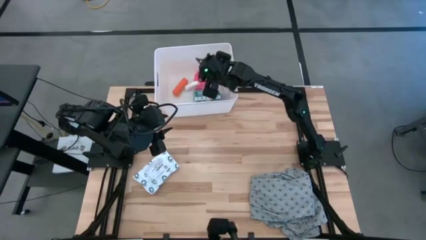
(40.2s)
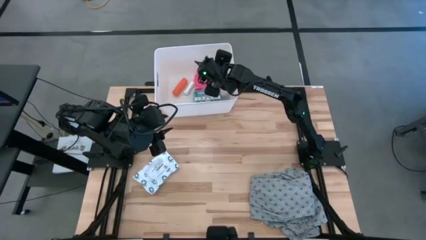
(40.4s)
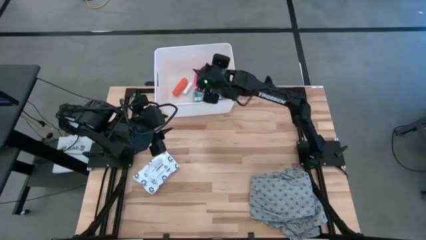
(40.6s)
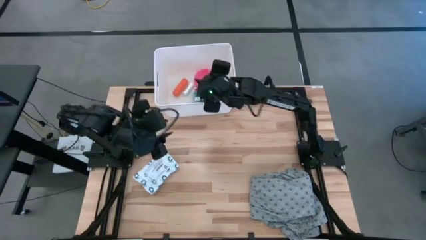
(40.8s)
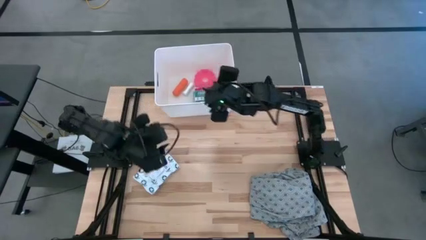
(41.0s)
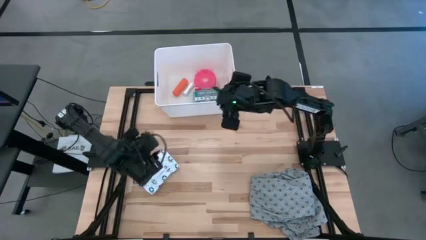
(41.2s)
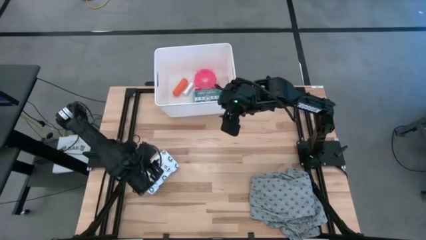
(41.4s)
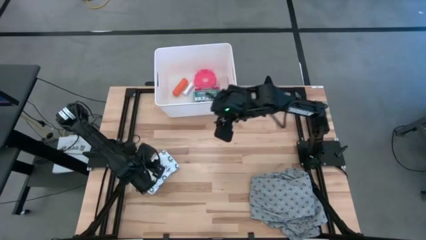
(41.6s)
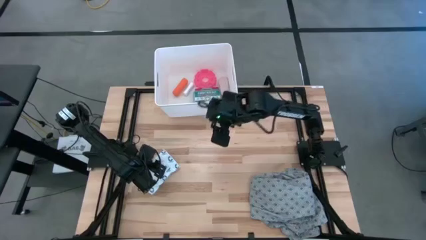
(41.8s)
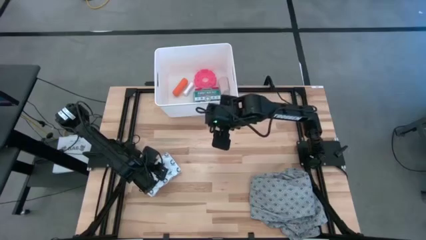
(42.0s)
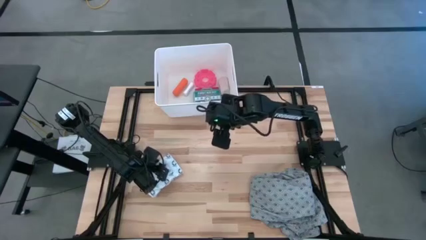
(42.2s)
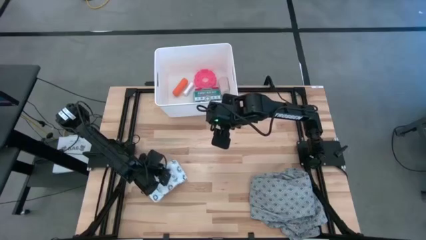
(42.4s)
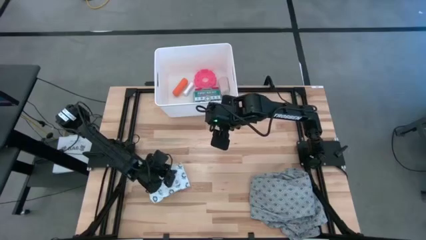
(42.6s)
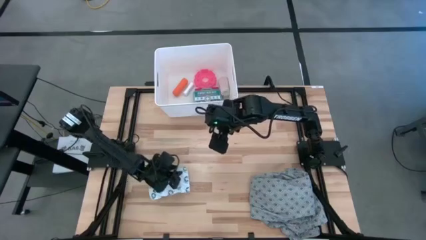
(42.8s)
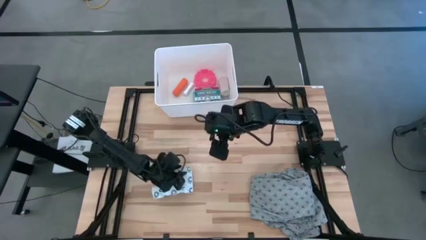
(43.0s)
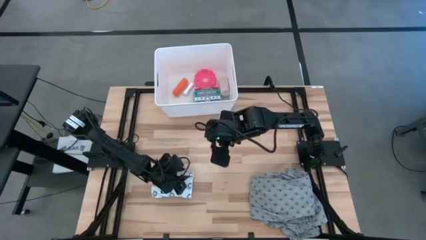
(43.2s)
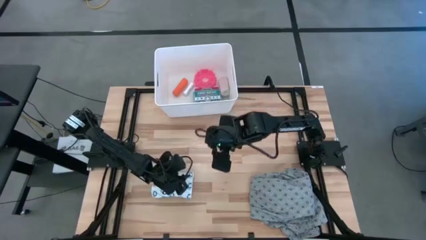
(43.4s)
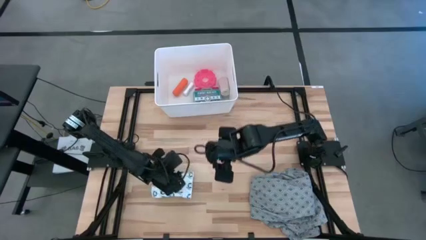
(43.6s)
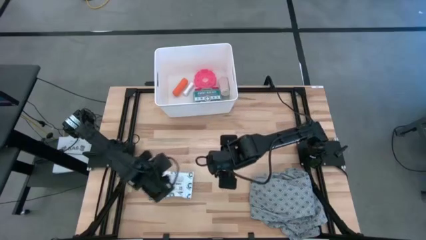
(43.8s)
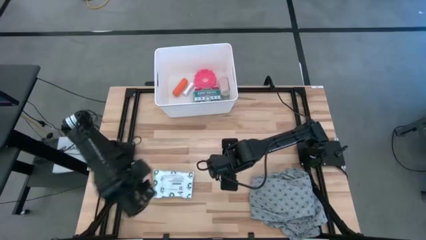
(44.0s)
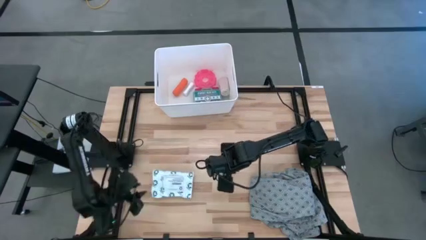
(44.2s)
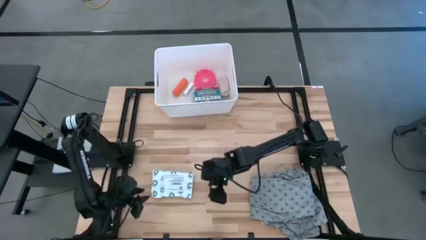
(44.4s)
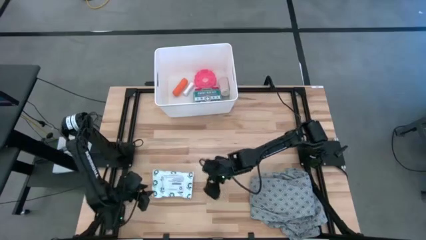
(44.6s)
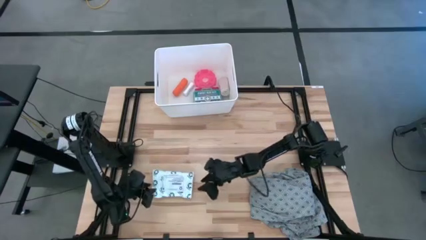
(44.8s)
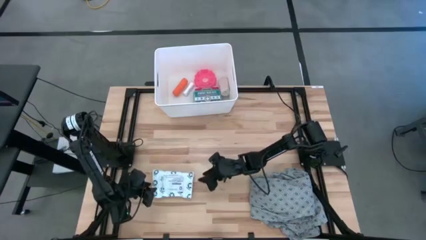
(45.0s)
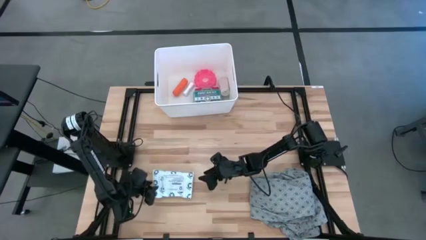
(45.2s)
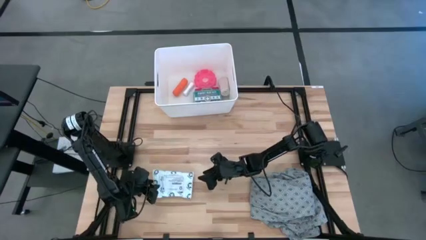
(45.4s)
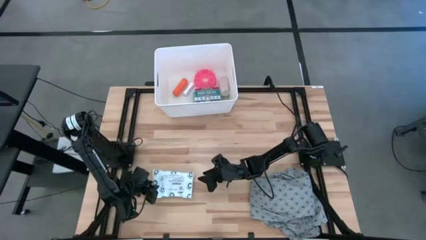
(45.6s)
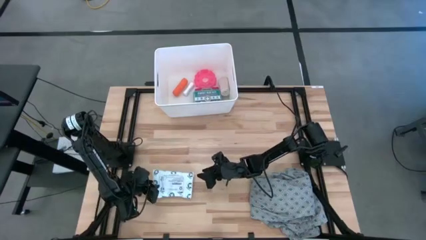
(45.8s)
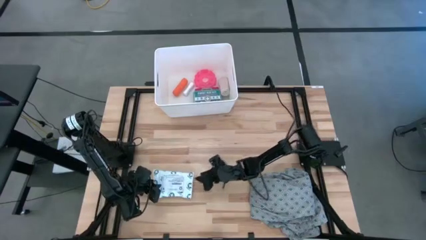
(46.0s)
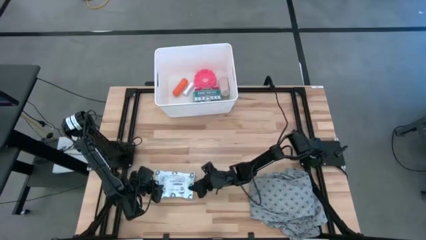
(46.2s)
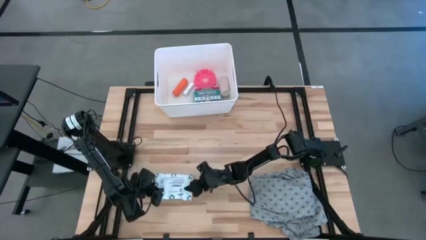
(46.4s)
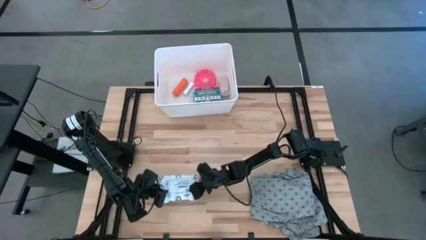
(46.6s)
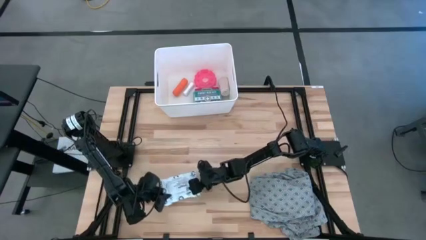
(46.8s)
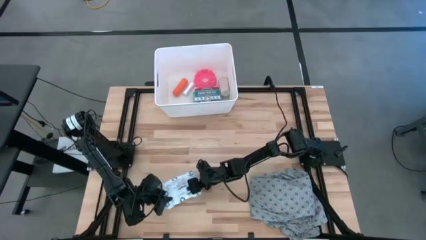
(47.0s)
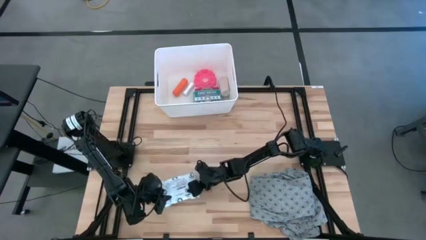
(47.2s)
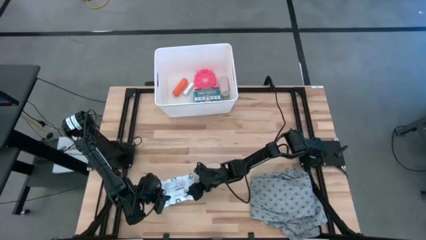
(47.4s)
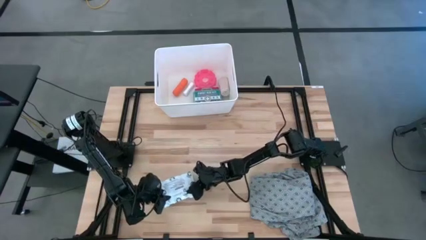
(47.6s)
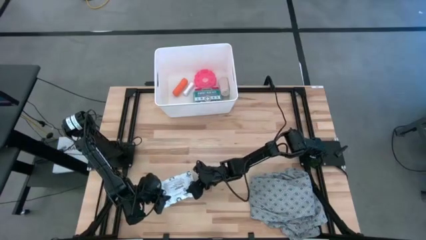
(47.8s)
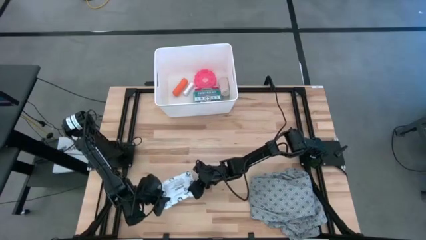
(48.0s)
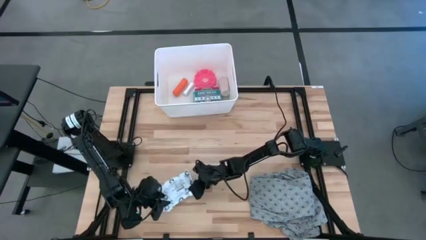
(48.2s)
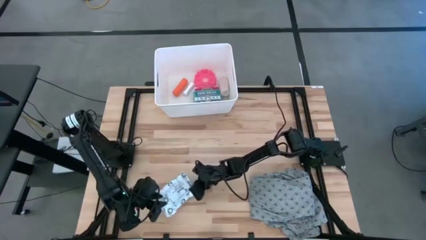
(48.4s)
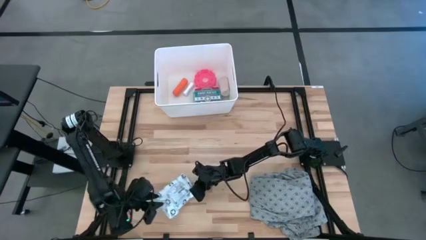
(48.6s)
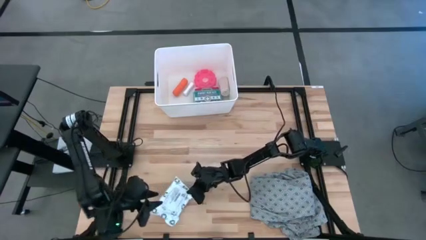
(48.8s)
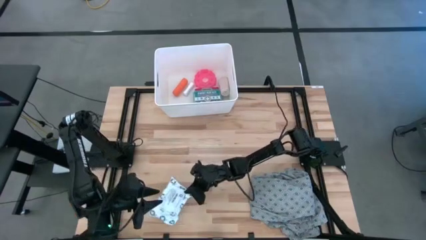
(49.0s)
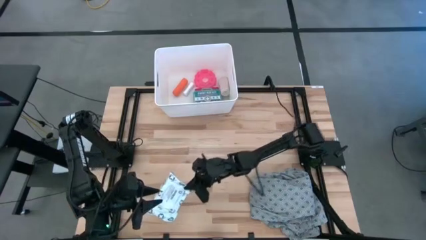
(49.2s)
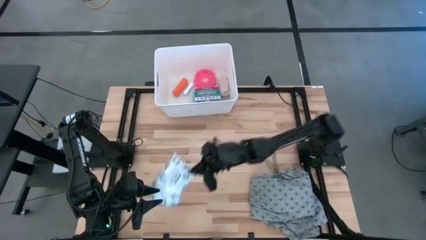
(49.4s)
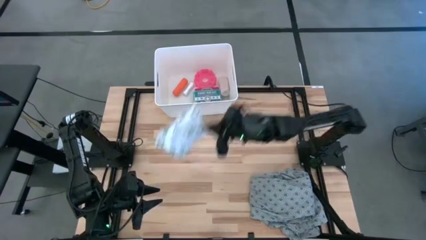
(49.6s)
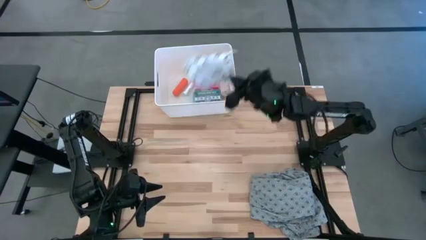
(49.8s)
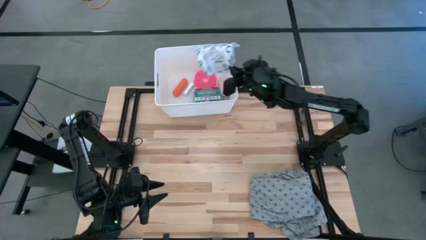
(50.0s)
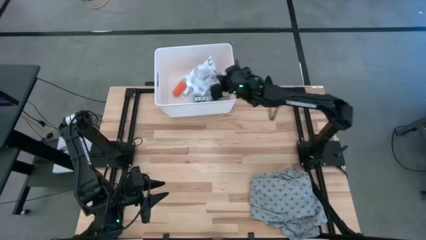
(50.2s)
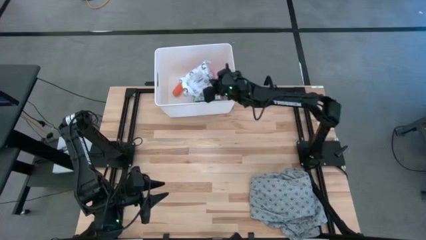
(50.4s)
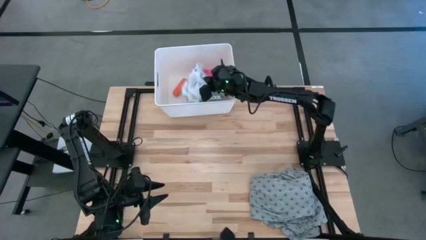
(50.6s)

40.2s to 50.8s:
Task: Pick & place medical supplies in basket/bin
Put the white mailer bag into the white bin

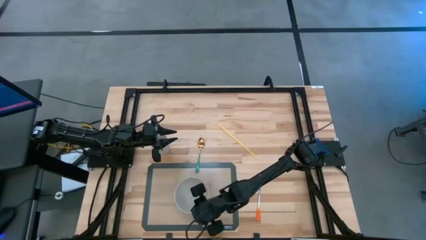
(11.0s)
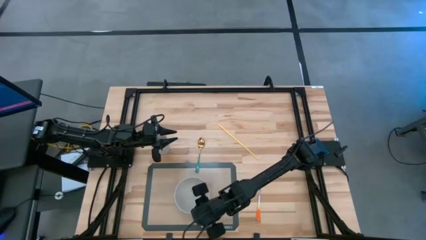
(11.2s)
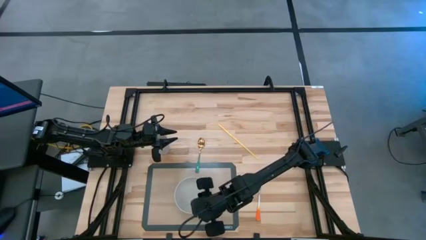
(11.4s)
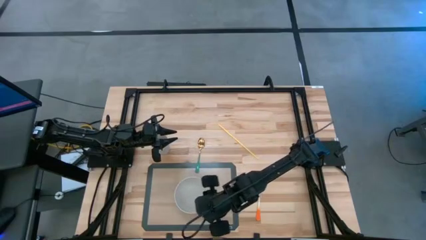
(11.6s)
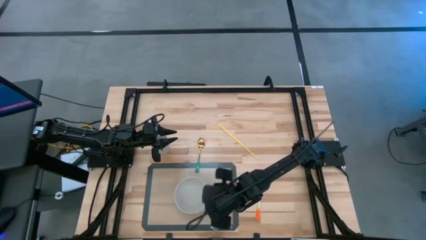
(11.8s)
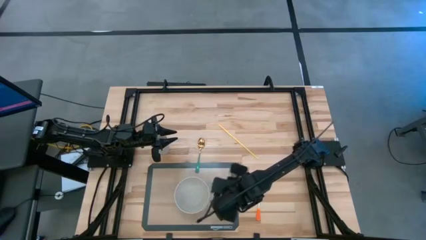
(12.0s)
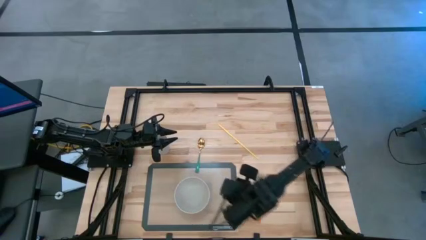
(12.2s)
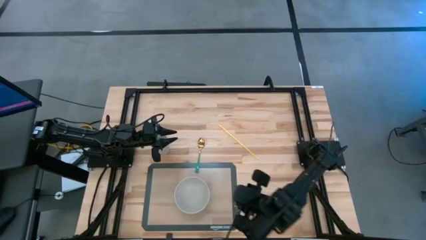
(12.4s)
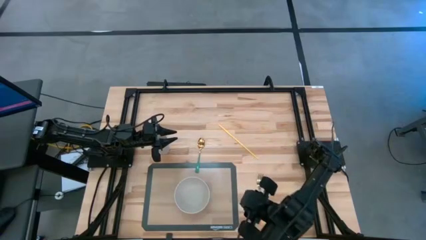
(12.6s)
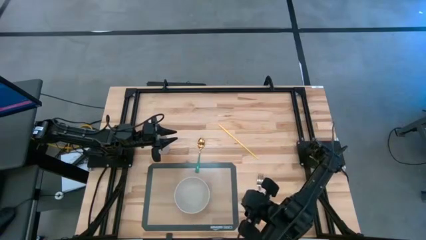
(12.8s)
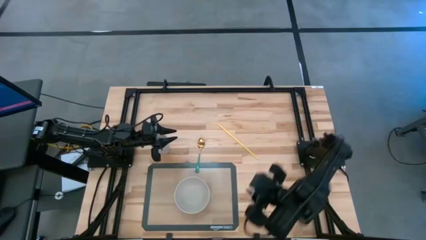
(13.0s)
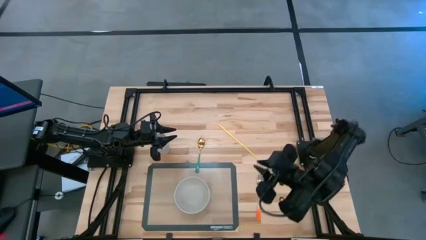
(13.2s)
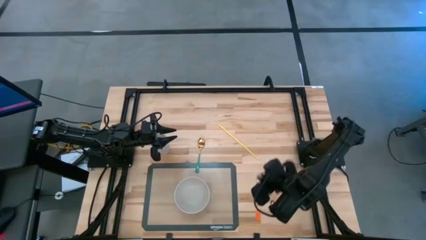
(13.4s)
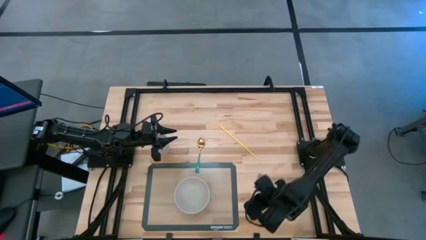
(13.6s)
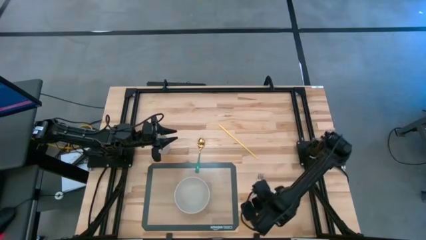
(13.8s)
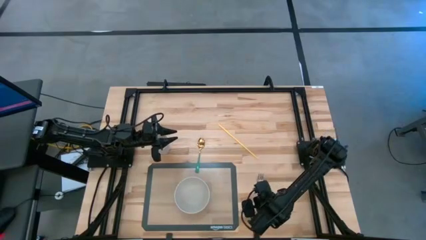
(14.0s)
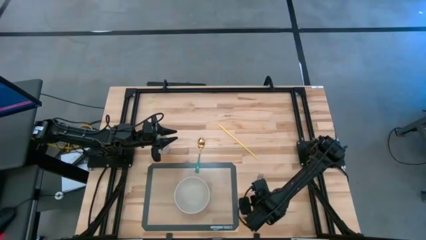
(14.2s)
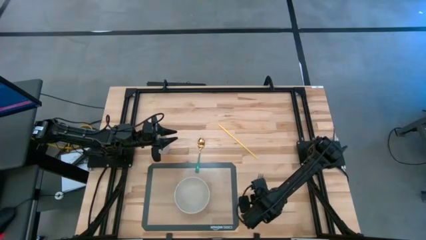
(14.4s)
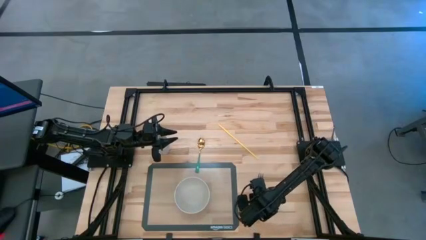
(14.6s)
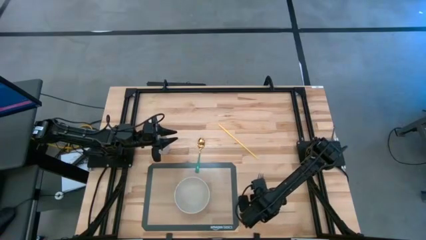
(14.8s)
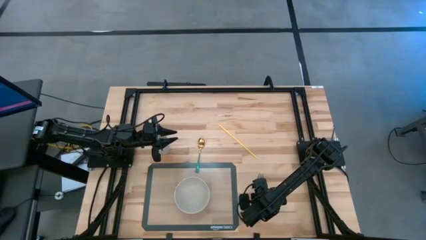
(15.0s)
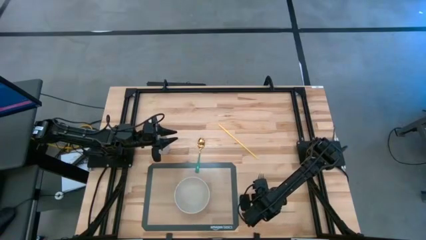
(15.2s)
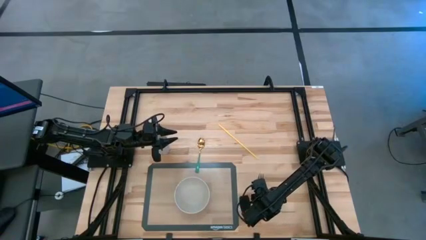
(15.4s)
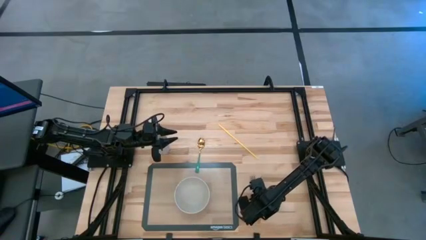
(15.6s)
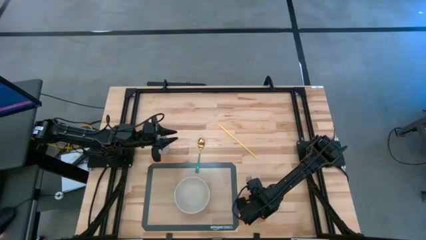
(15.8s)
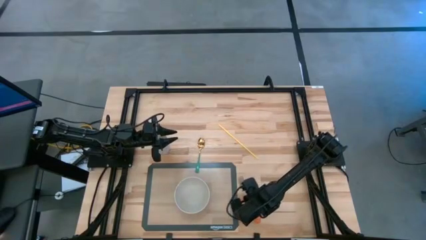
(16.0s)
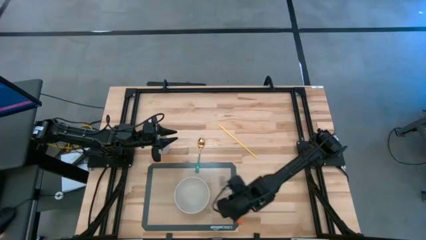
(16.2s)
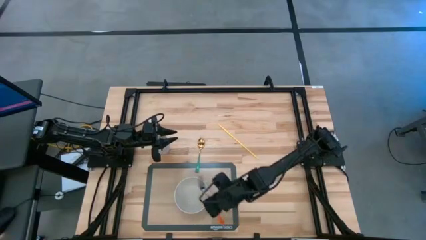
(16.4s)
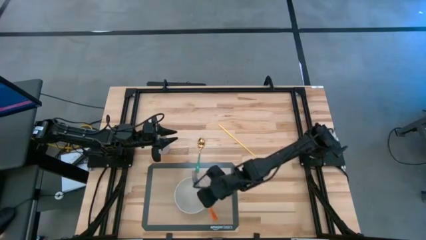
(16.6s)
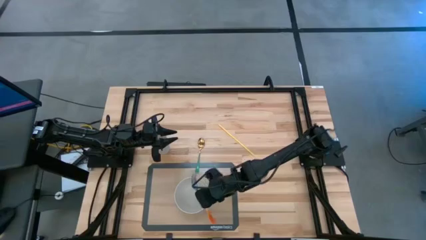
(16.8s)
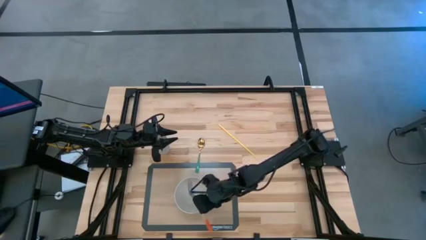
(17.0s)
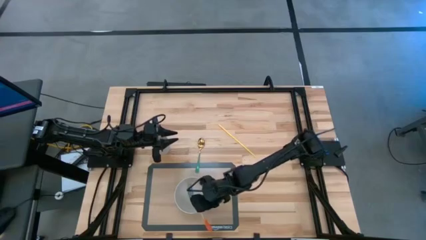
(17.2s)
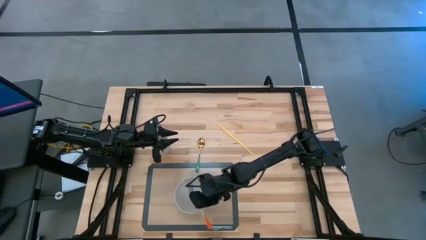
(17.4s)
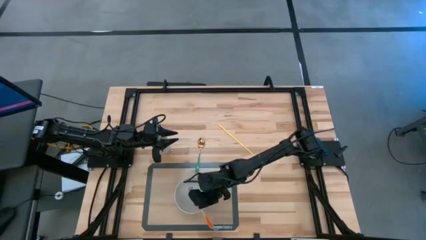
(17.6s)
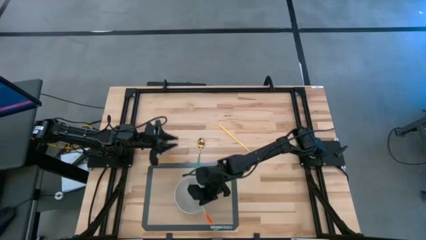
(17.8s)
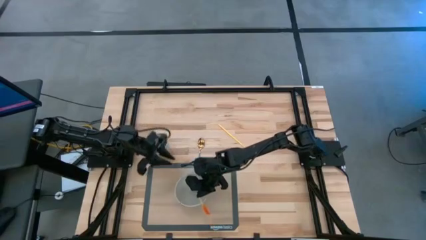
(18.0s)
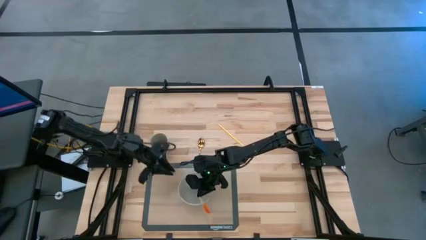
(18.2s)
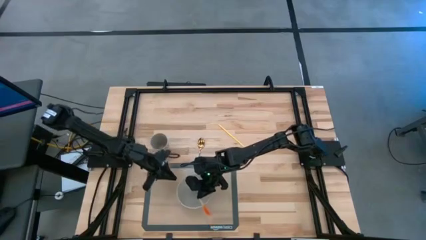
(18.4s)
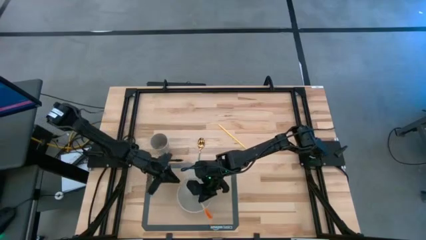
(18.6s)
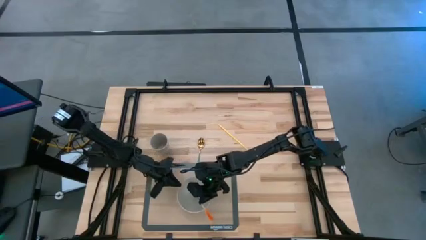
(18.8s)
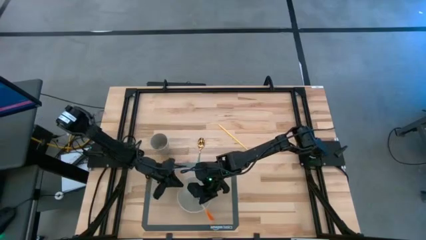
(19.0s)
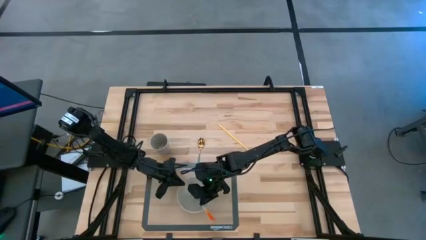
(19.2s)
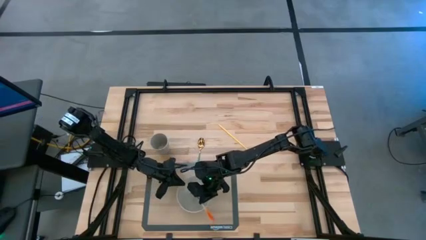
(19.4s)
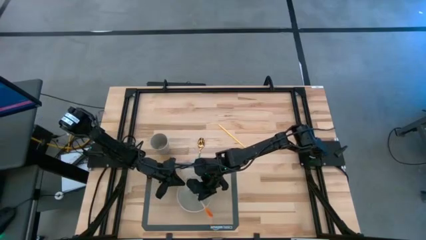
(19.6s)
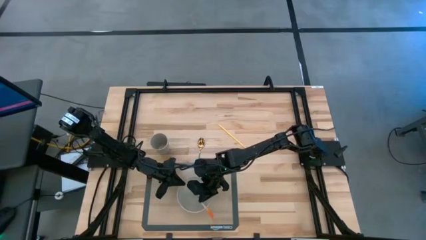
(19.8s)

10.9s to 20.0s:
Task: Pick & Place Utensil
Put the orange fork into the white bowl
